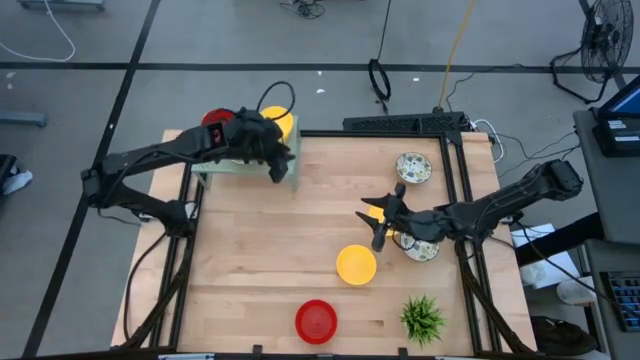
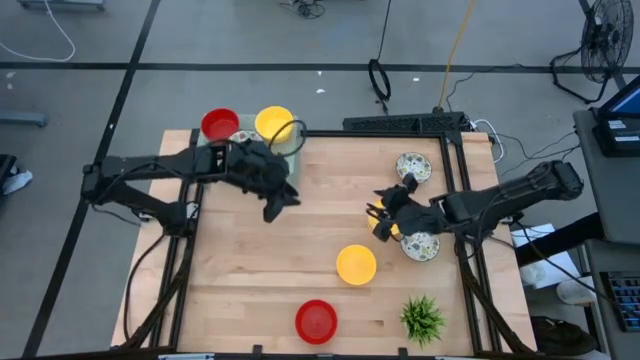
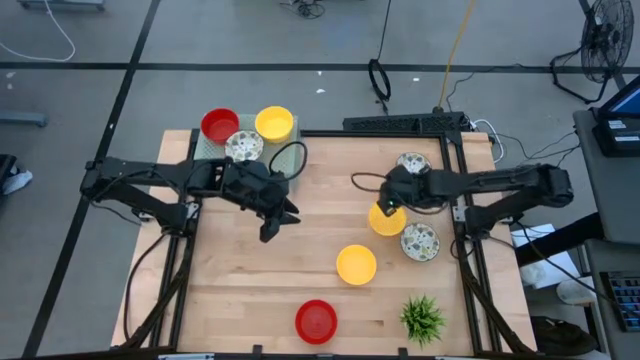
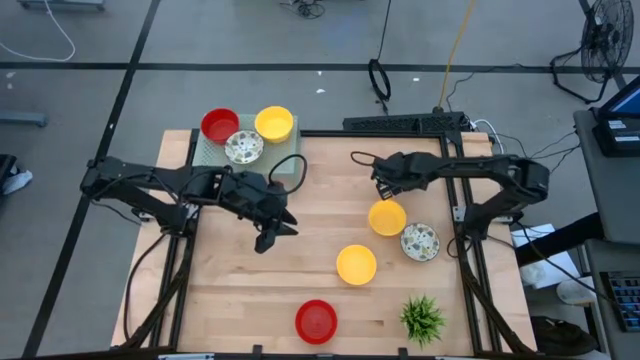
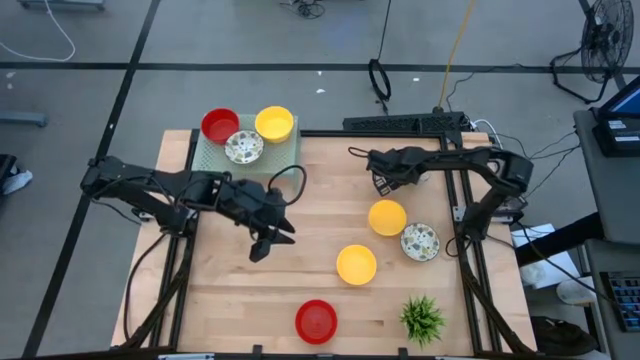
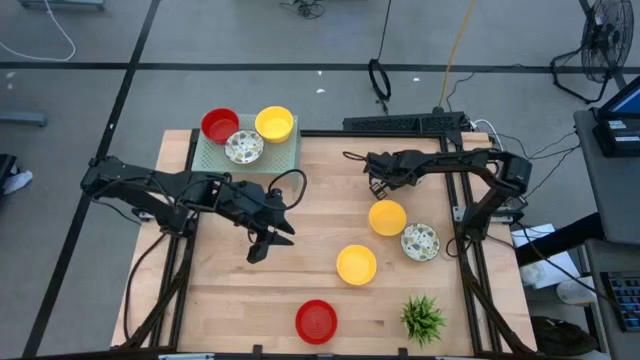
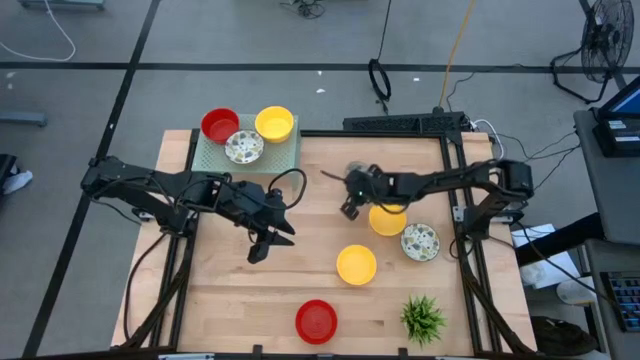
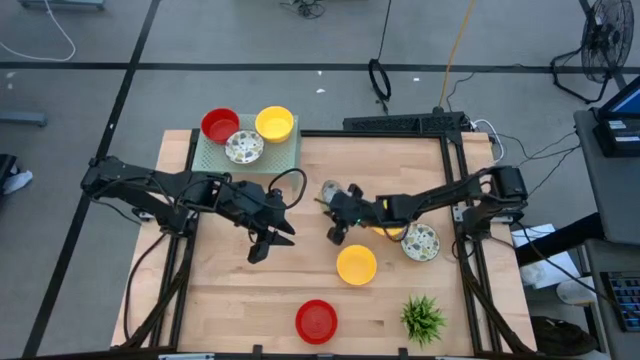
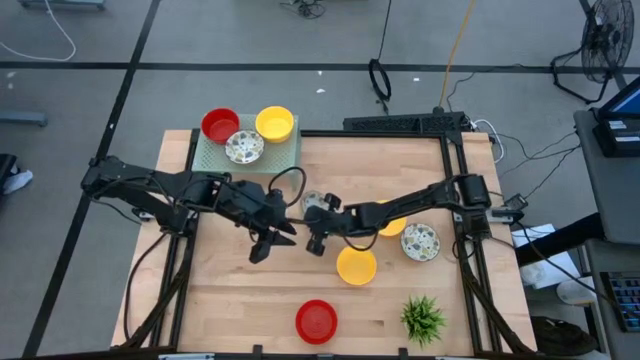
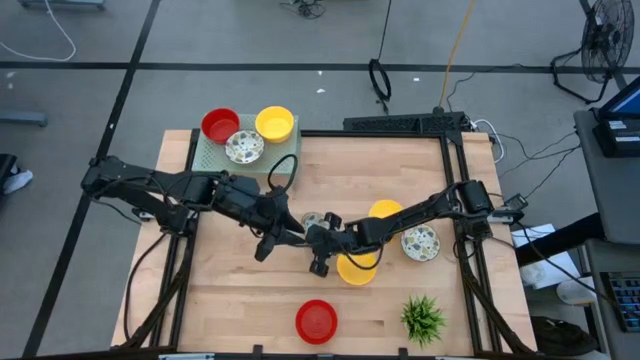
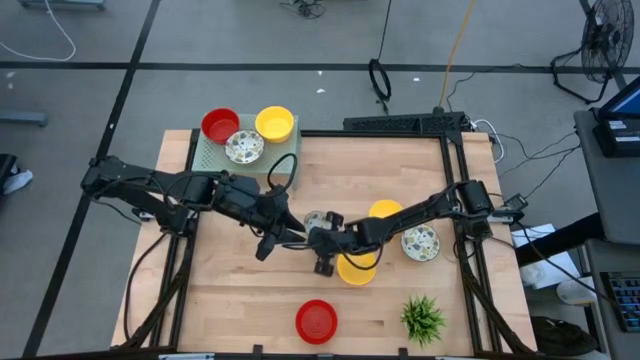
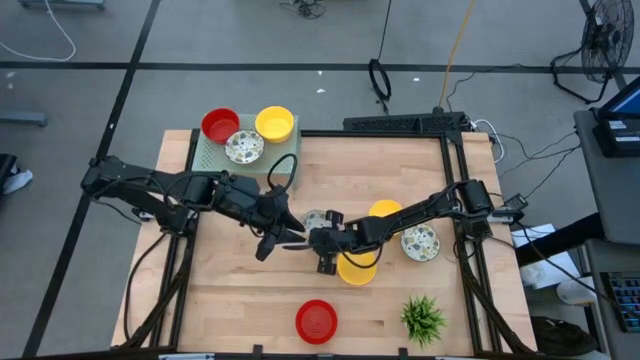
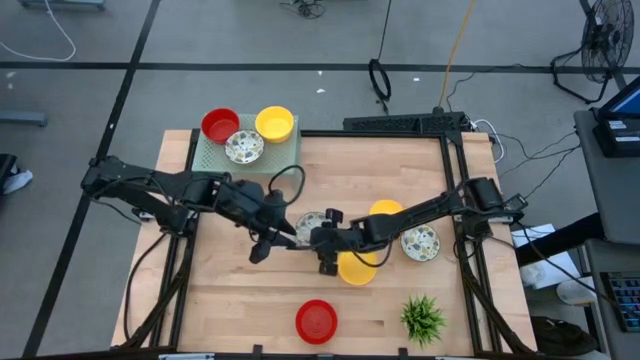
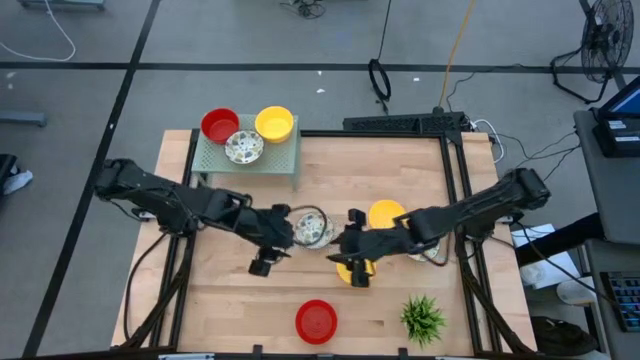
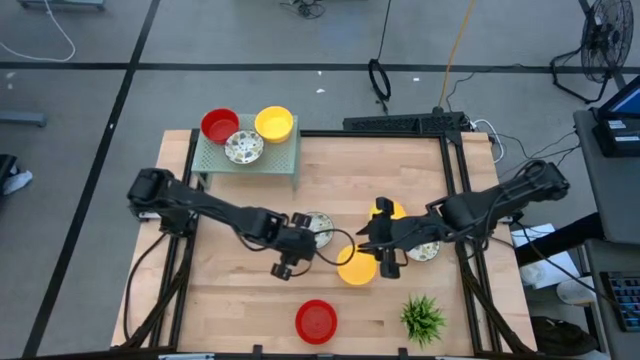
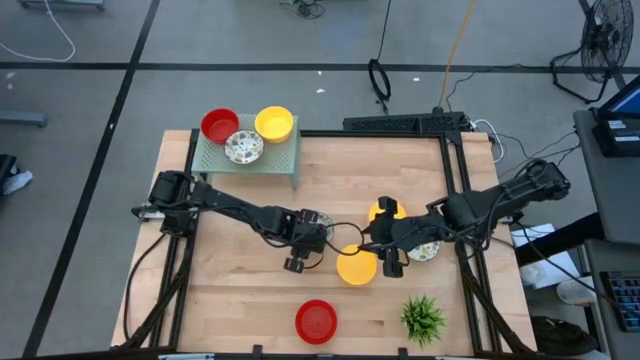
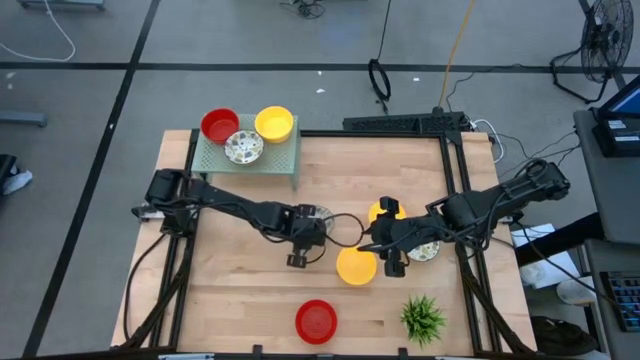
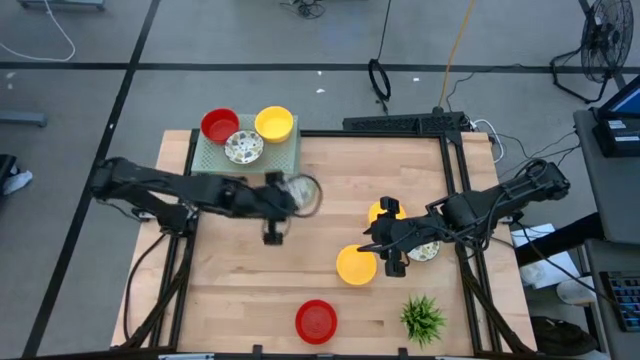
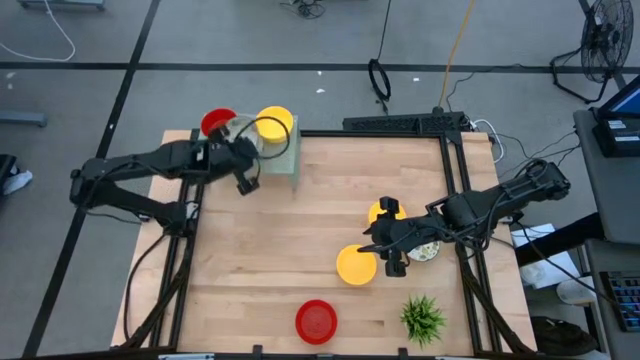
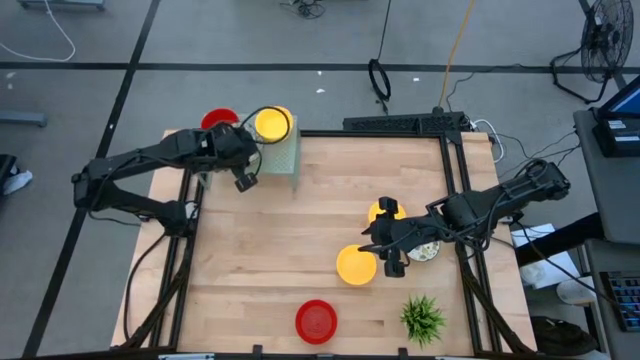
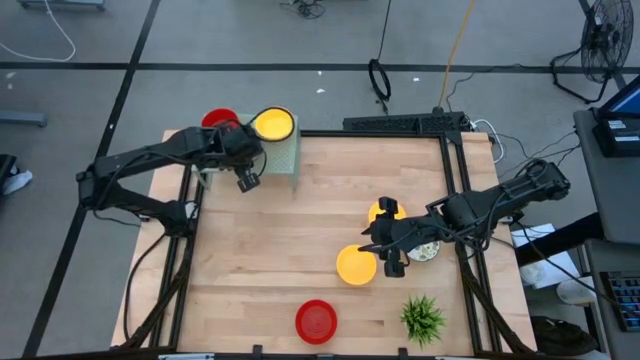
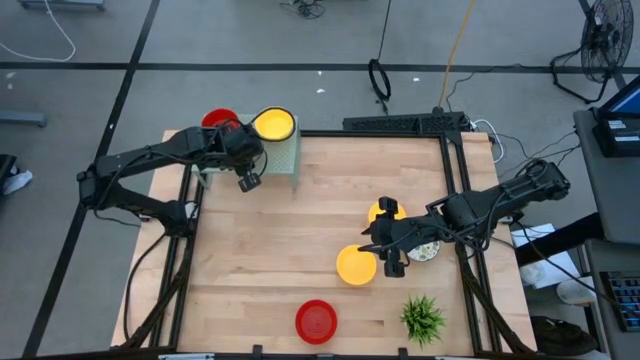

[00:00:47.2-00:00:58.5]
Task: Pick & Place Mini bowls
Stack the white patterned bowl on top of the white patterned bowl on the shelf

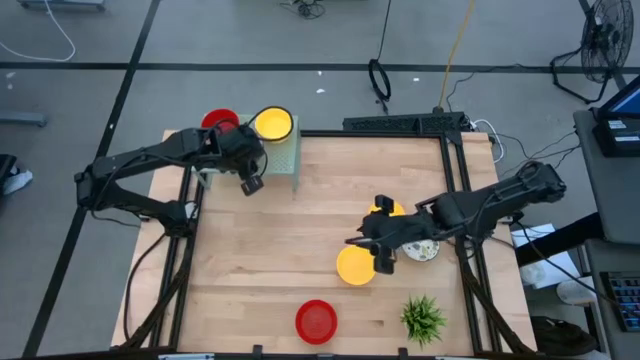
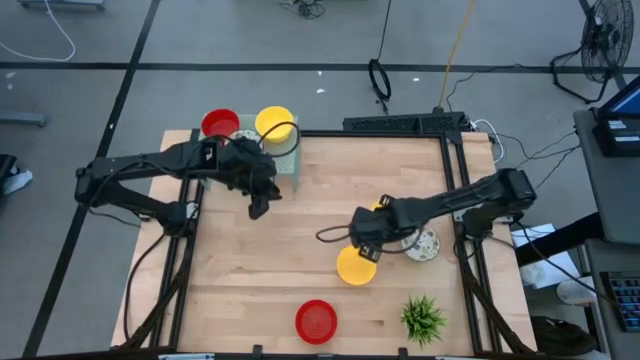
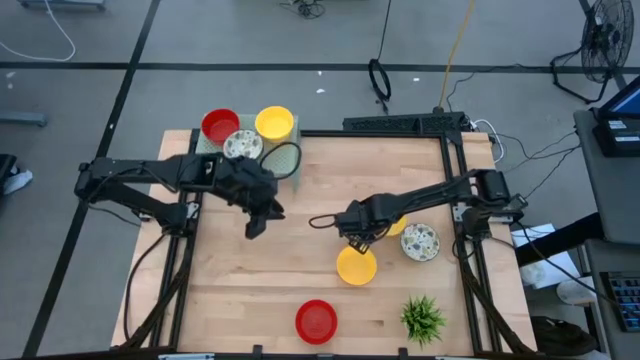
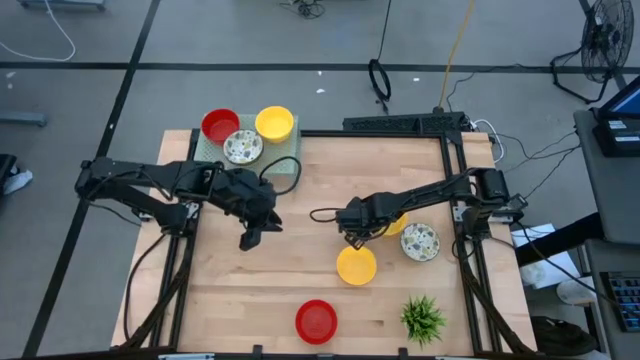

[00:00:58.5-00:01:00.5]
Stack the yellow bowl on top of the yellow bowl on the shelf

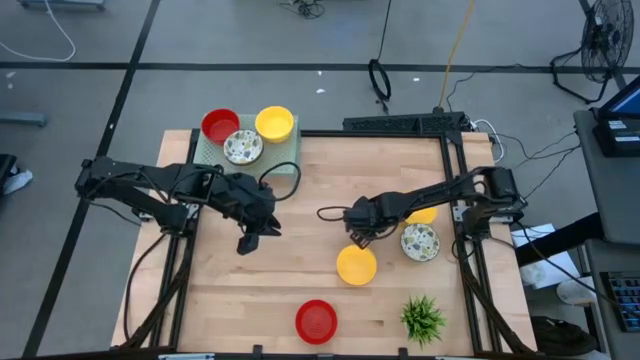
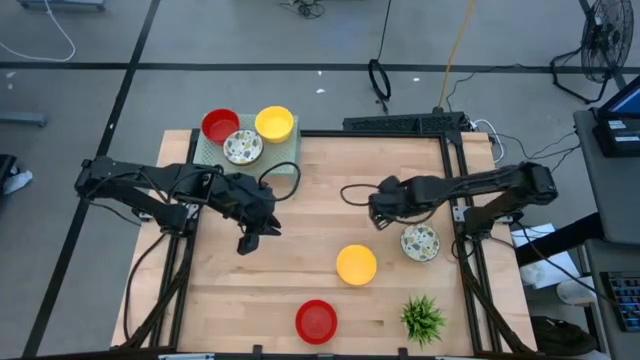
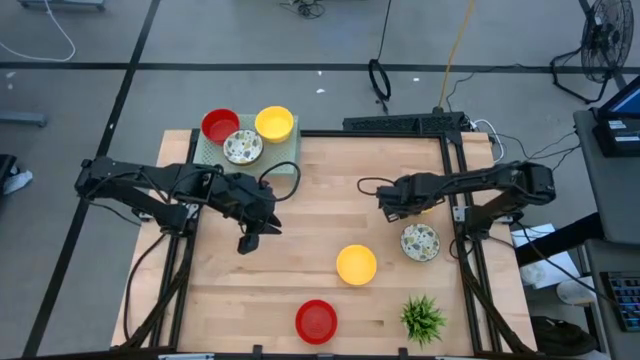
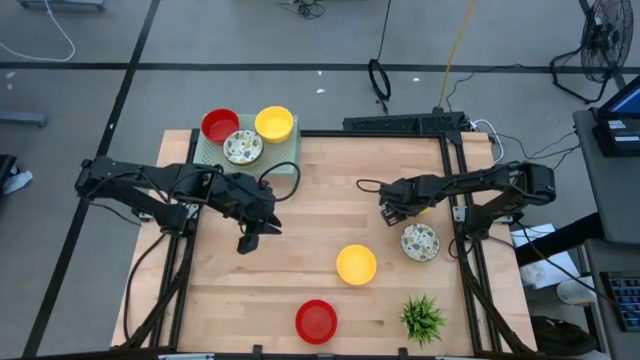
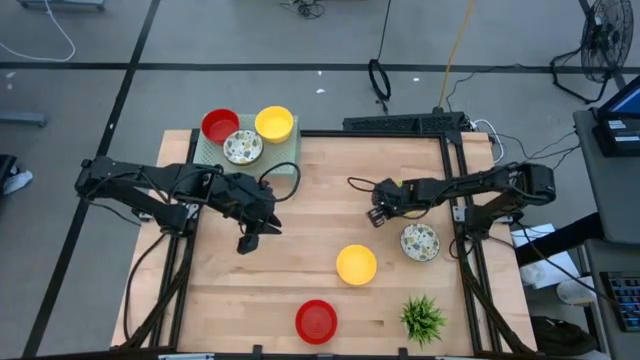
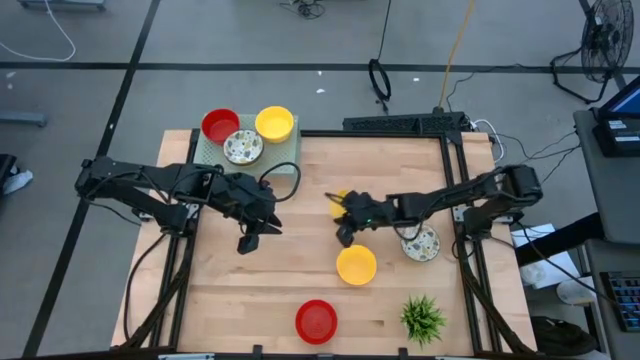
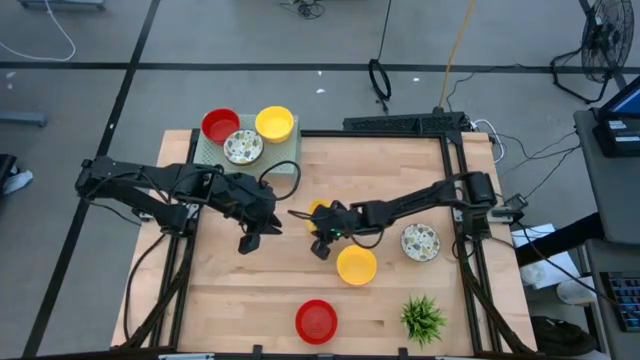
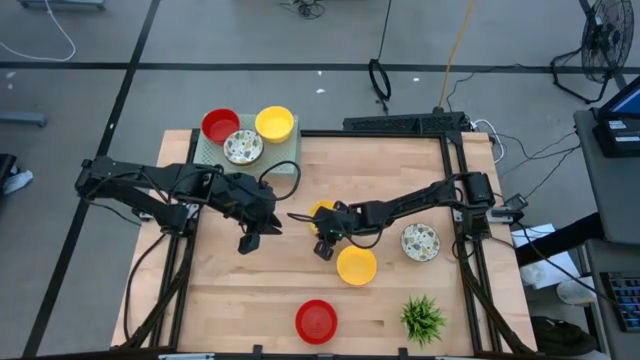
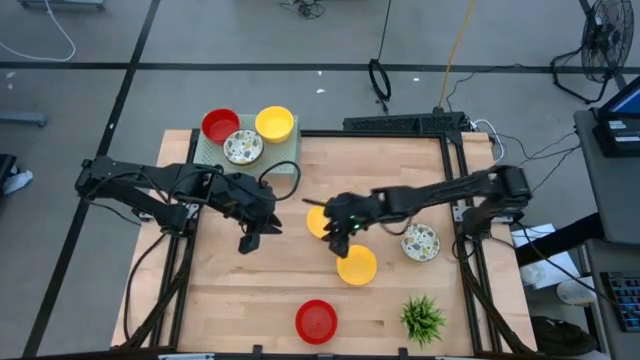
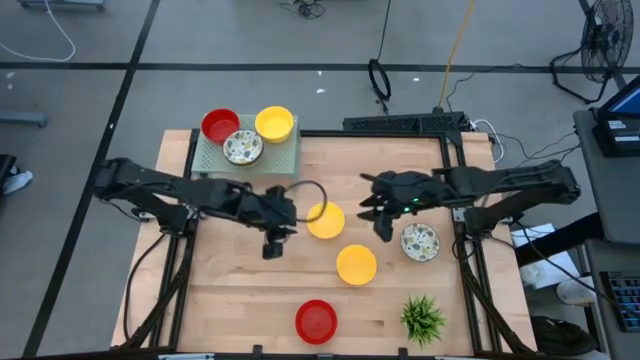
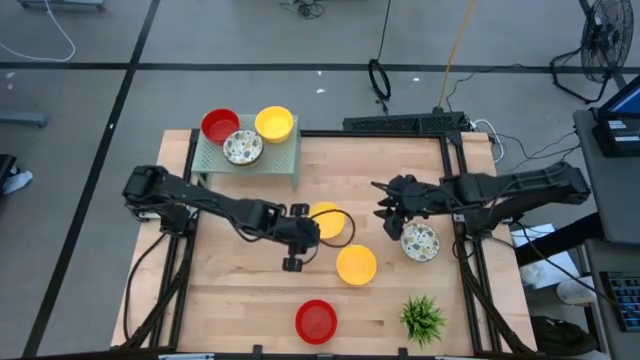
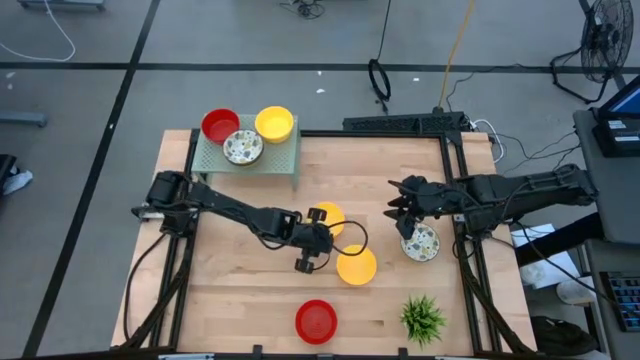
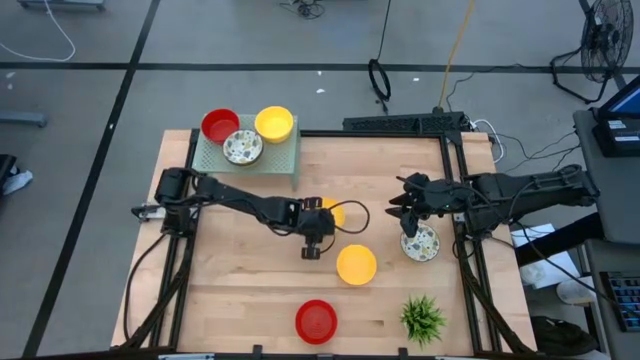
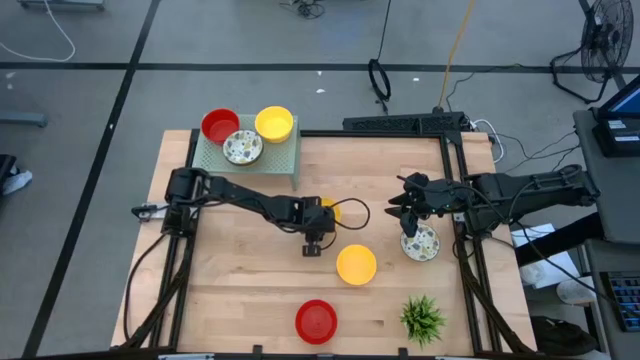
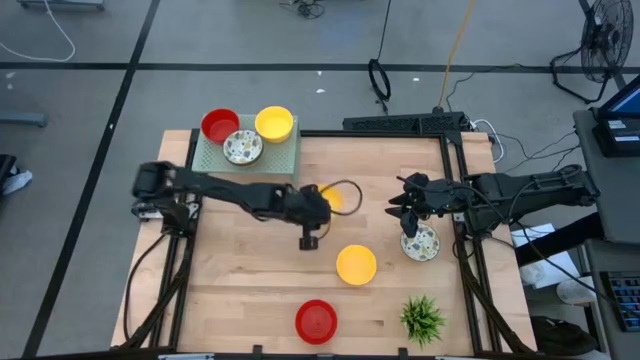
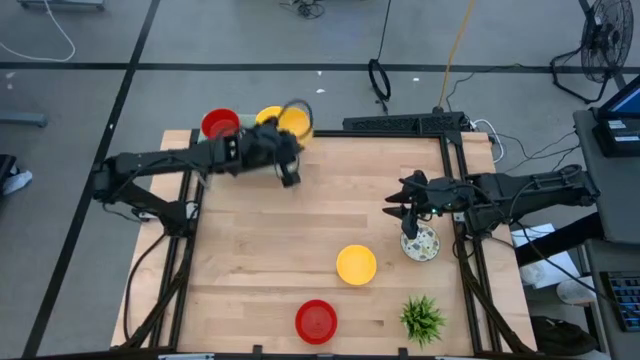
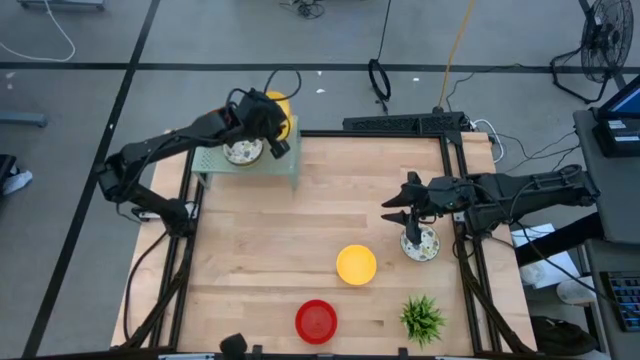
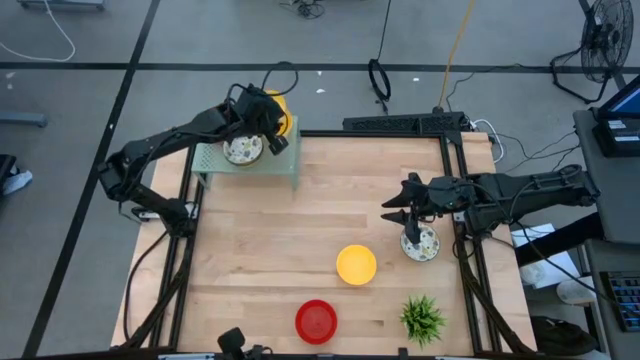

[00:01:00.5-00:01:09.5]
Stack the yellow bowl on top of the yellow bowl on the shelf
